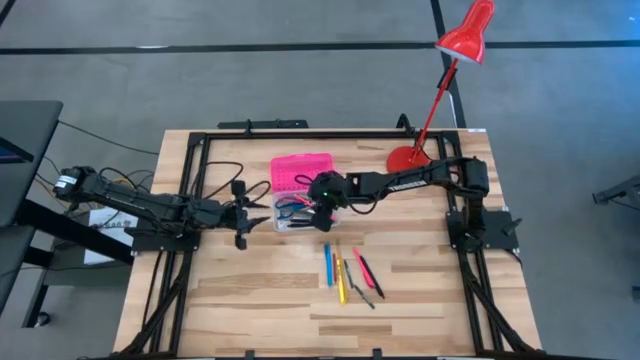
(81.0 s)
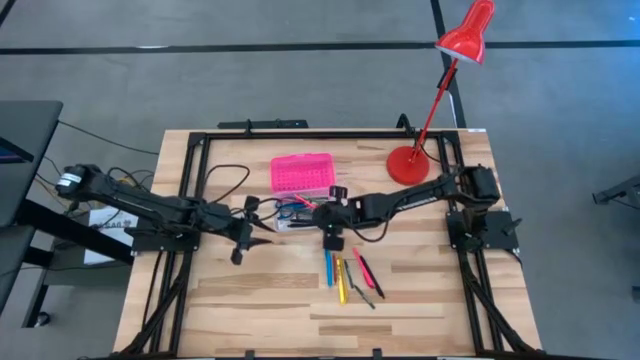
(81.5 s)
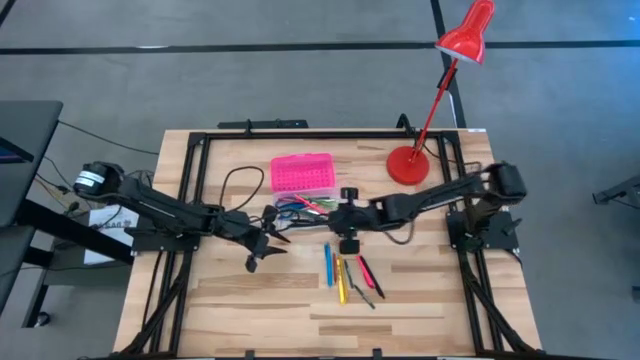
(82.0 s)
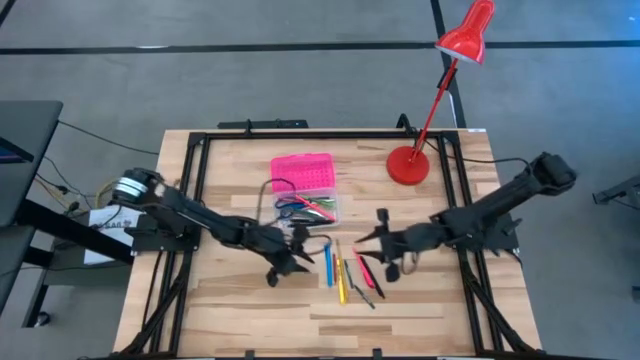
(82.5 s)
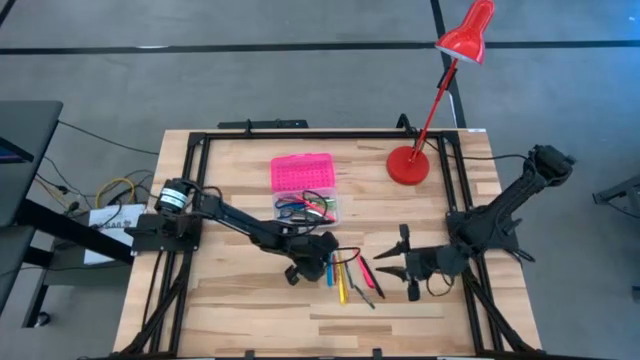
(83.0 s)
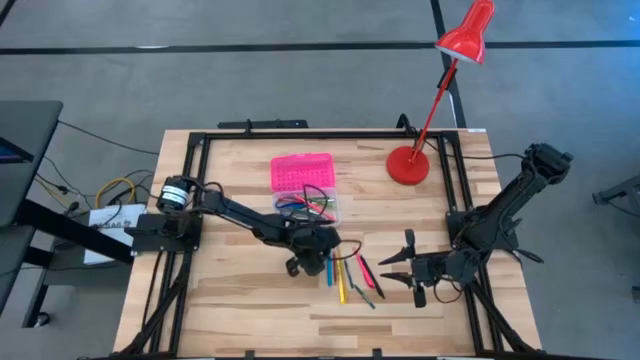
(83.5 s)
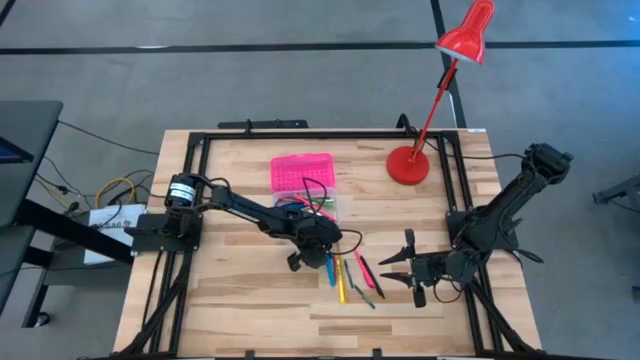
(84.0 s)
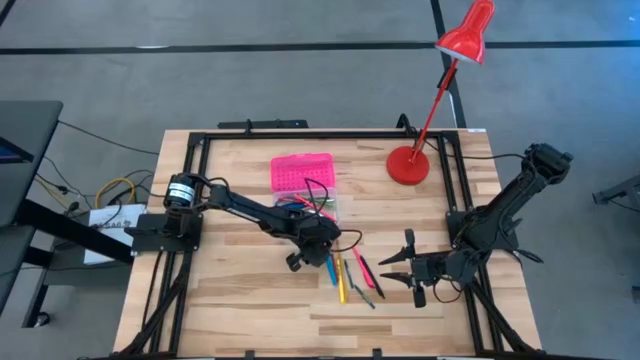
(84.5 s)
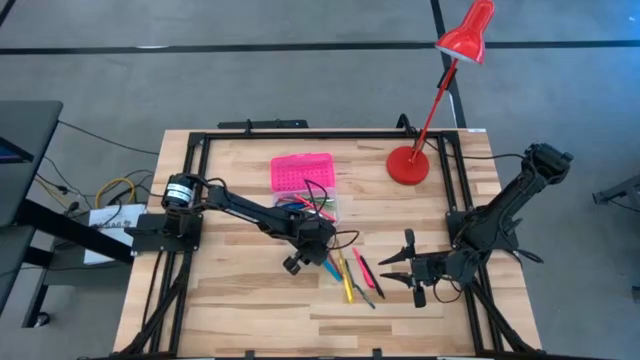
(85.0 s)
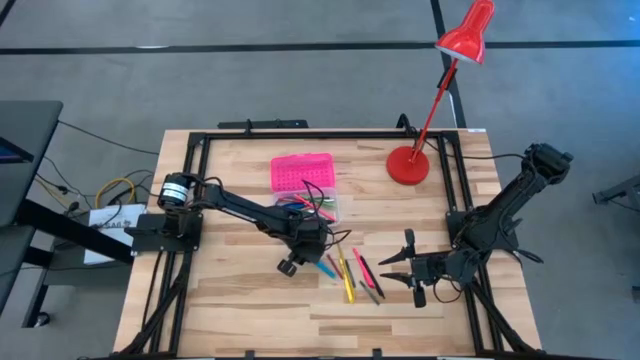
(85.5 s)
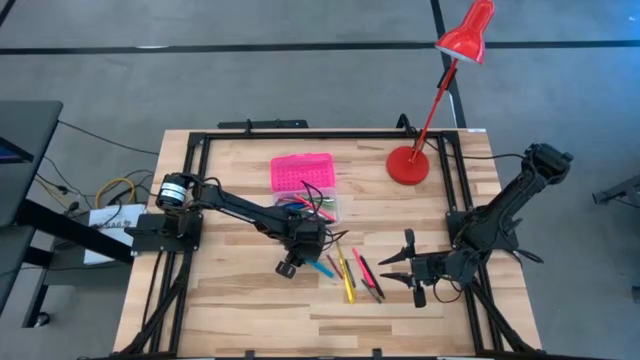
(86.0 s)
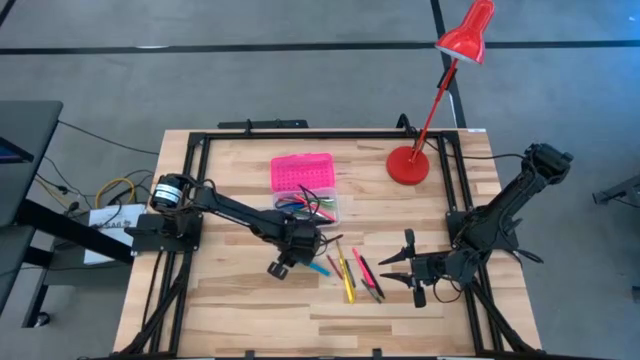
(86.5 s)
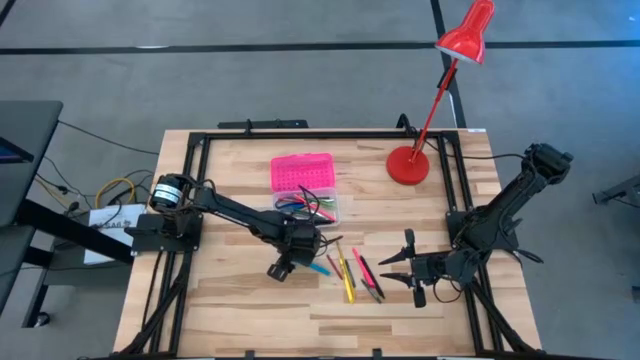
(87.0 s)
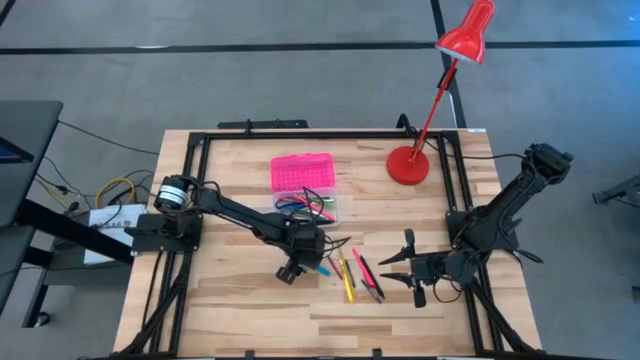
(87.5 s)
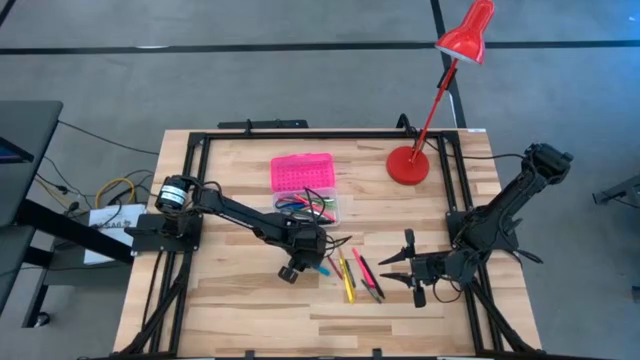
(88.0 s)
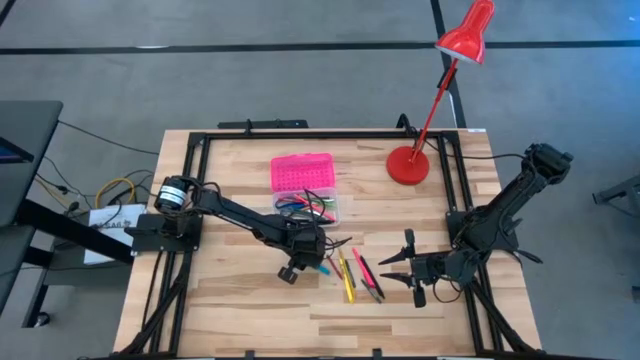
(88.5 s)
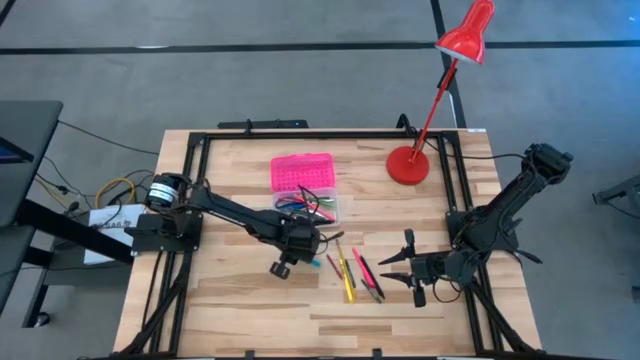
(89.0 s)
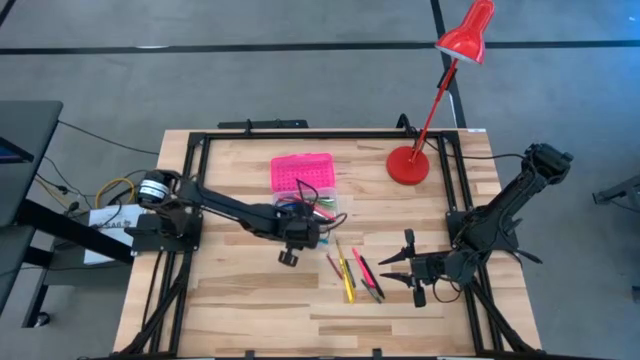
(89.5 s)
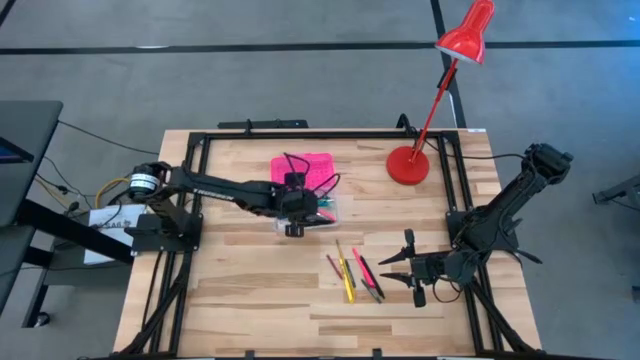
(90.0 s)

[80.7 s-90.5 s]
Task: Pick & place school supplies into a supply box
Put the blue pen into the pink supply box

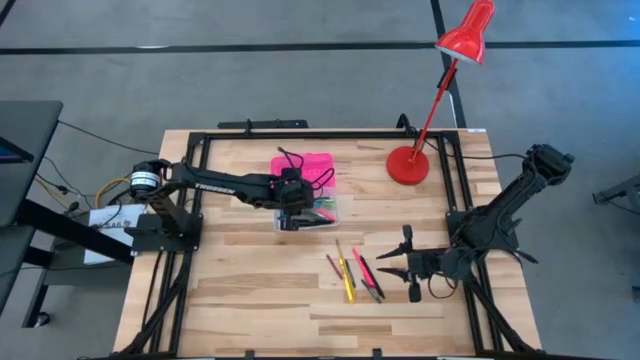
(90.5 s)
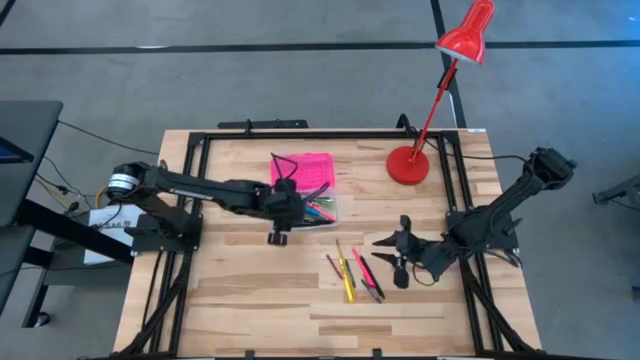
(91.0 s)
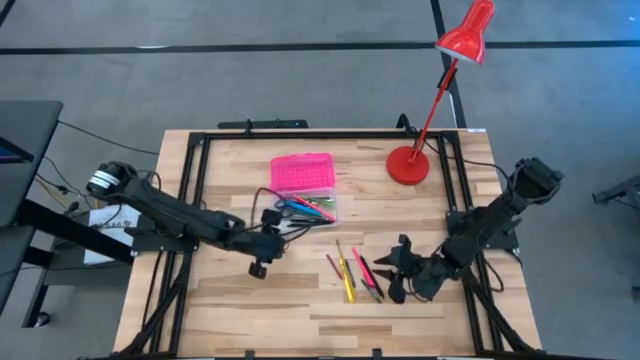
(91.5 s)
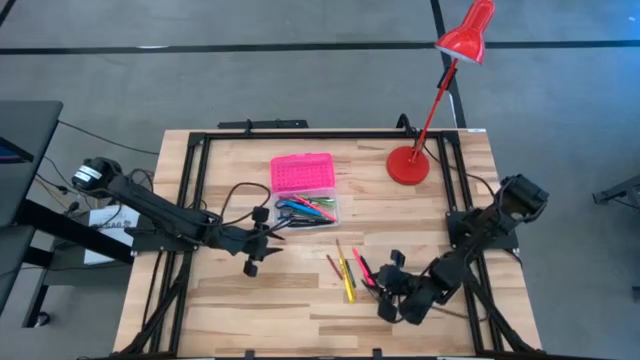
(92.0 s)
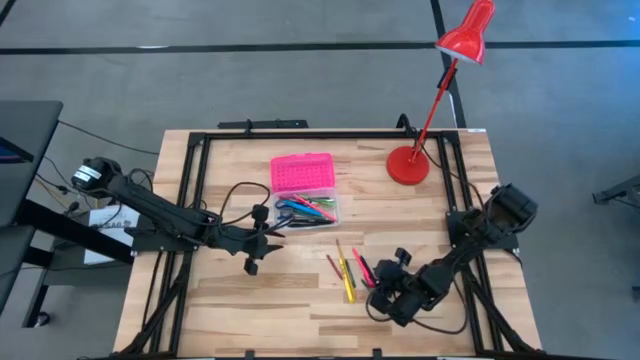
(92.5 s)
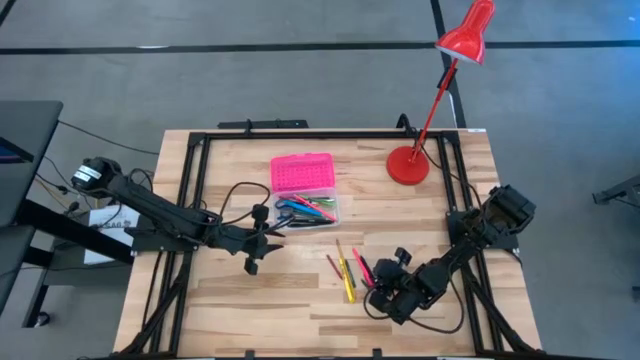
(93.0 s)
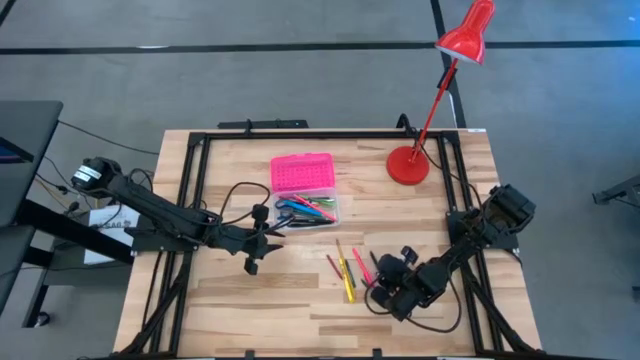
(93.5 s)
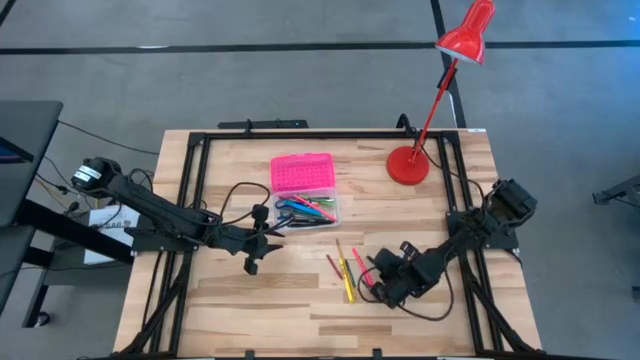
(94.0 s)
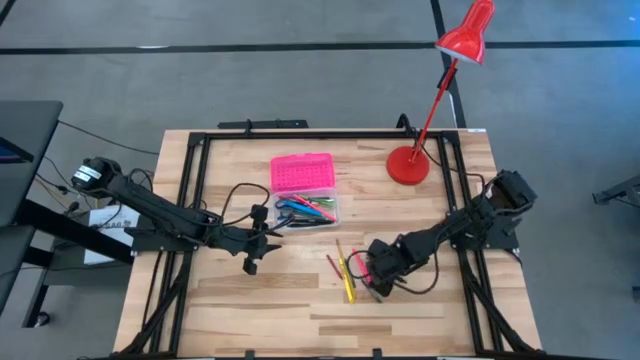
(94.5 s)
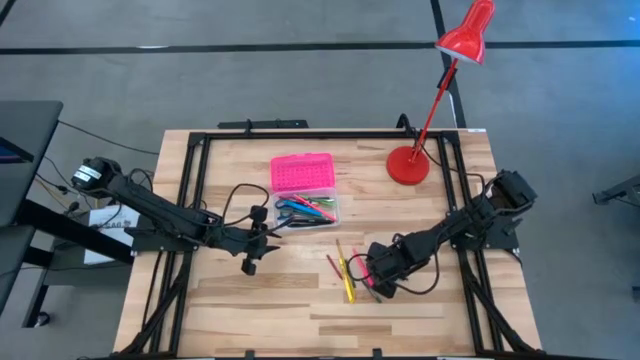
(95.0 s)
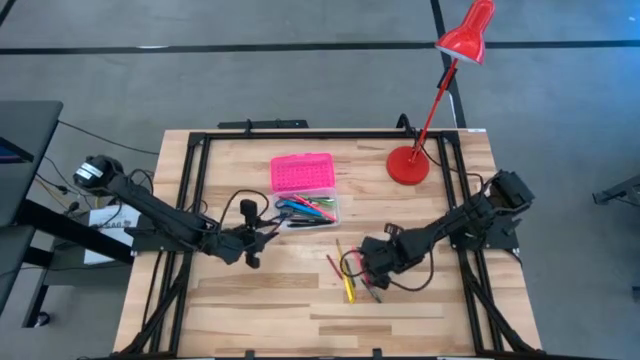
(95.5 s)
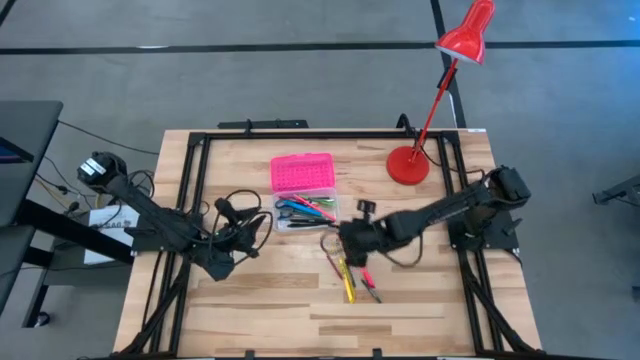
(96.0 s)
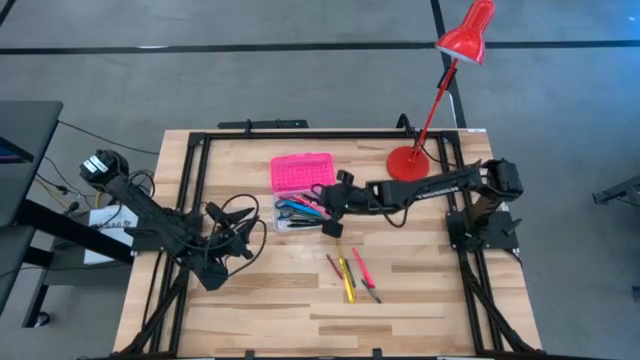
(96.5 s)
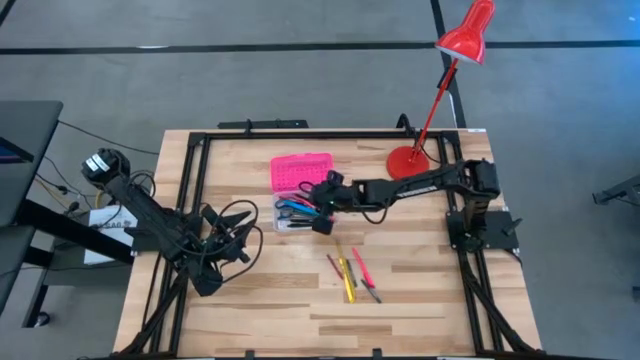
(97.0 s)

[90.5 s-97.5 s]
Put the black pen into the pink supply box

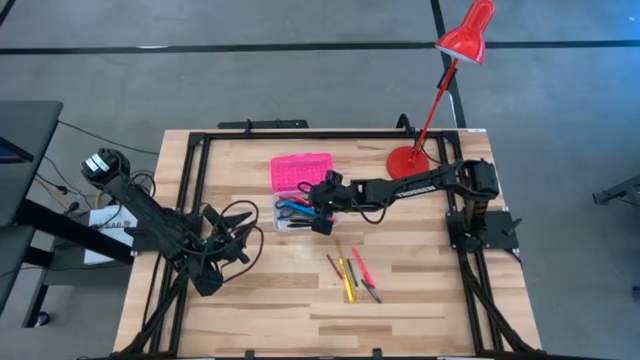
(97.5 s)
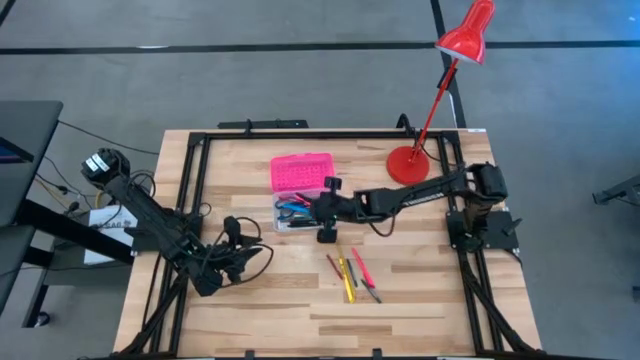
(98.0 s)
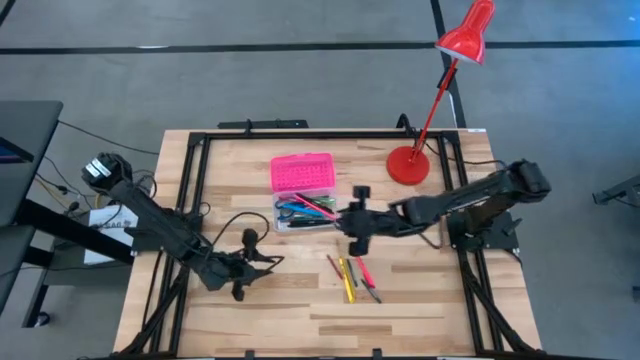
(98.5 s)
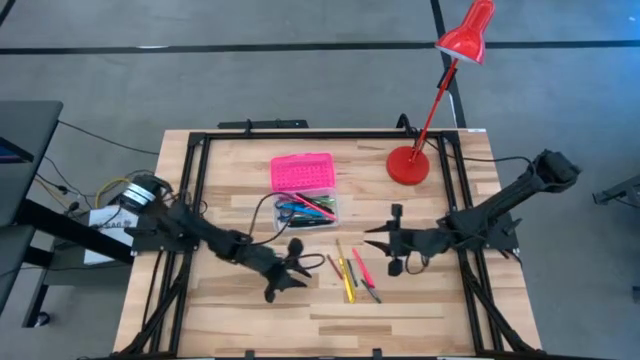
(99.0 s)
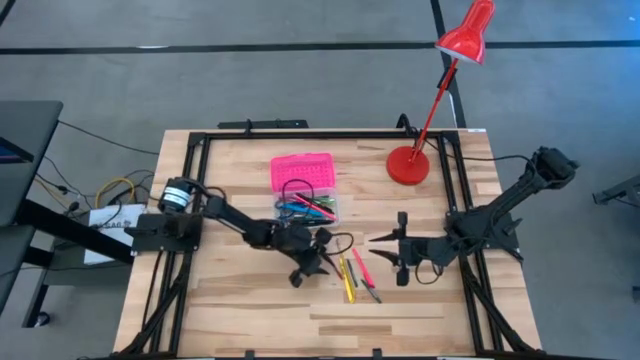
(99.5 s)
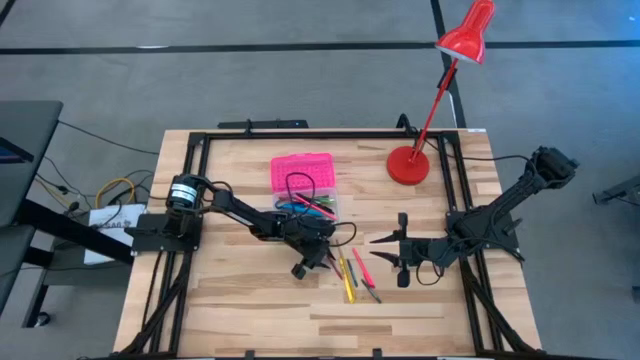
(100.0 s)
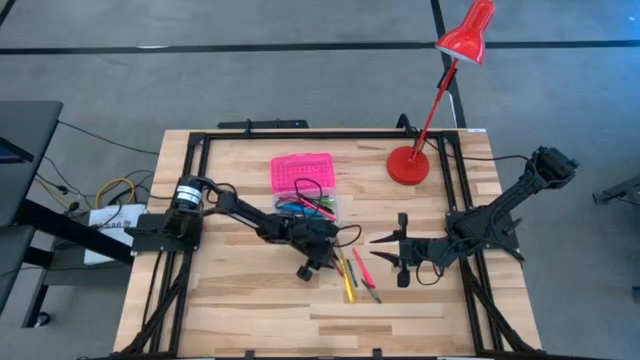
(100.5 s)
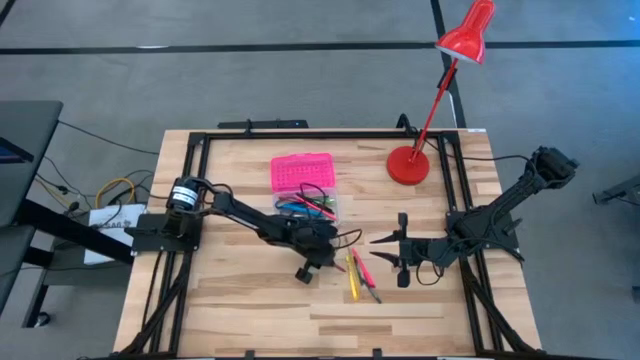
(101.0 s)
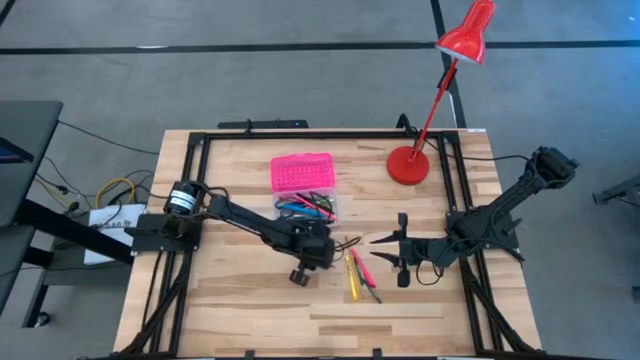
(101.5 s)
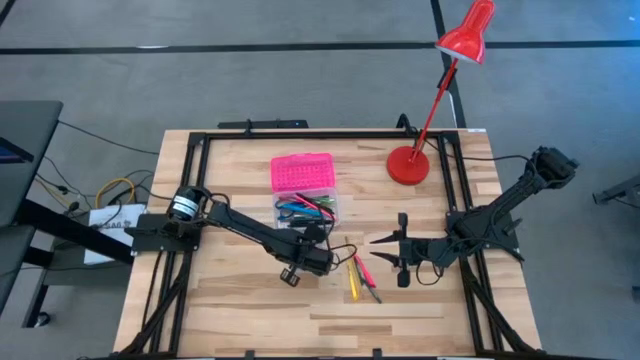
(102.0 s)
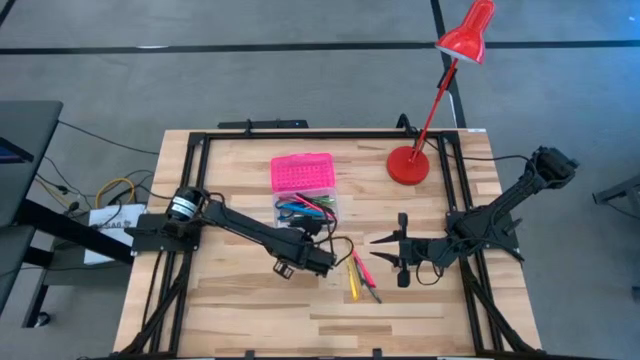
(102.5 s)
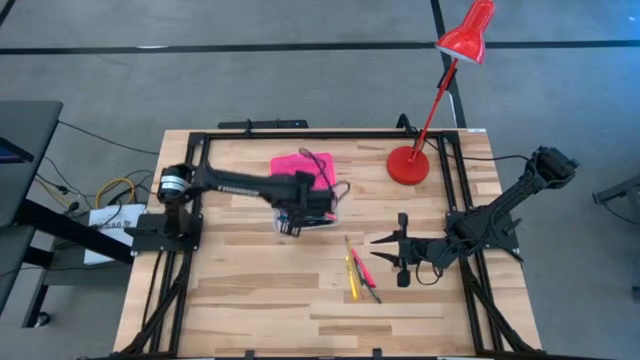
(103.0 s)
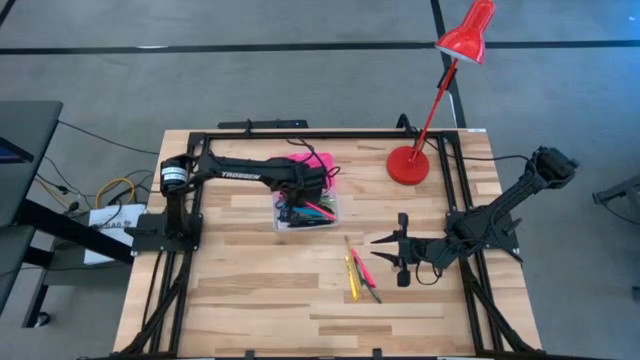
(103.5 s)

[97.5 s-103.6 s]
Put the red crayon into the pink supply box
